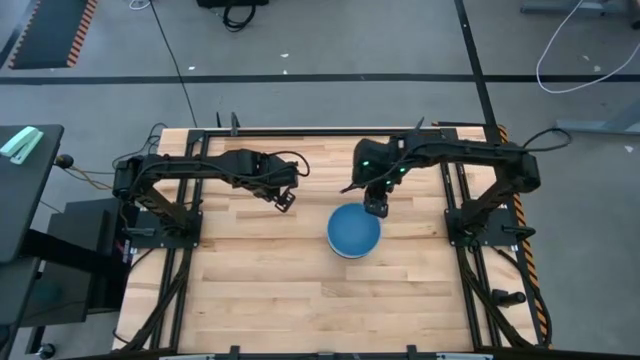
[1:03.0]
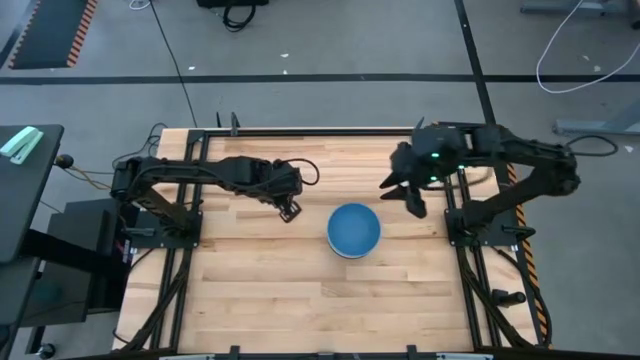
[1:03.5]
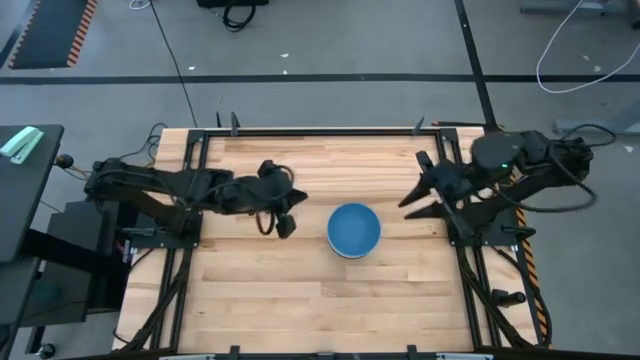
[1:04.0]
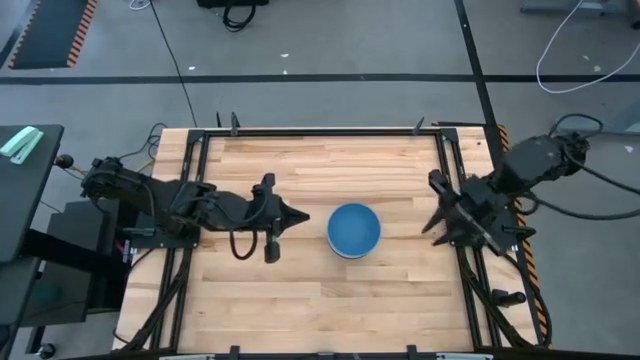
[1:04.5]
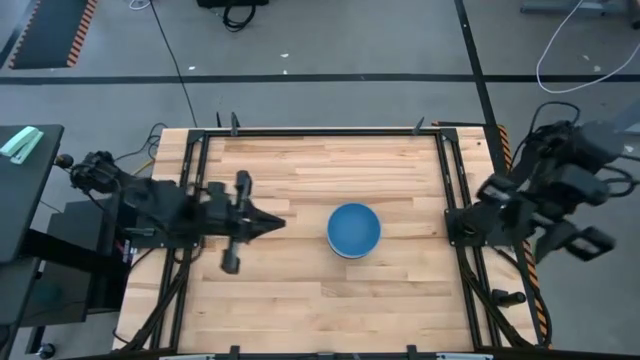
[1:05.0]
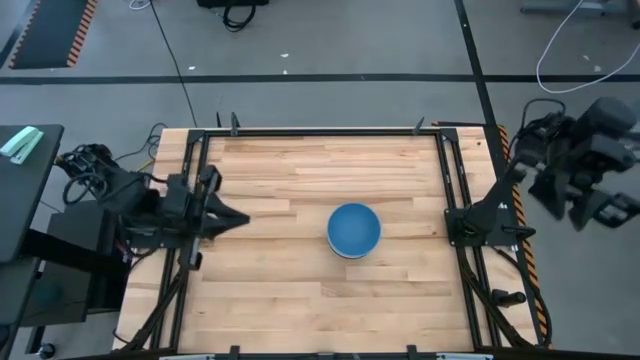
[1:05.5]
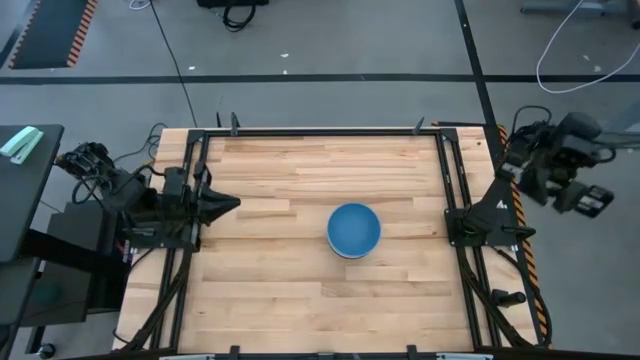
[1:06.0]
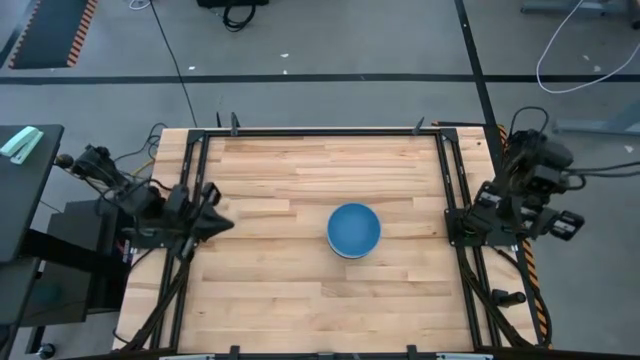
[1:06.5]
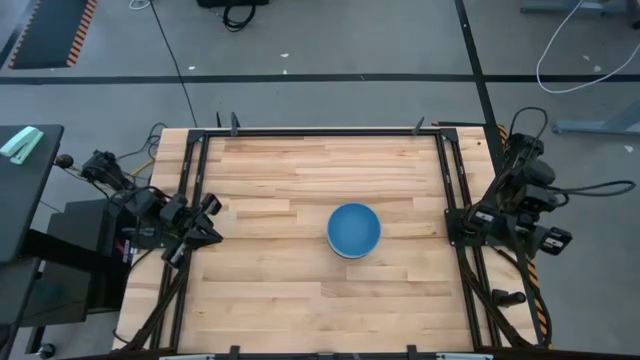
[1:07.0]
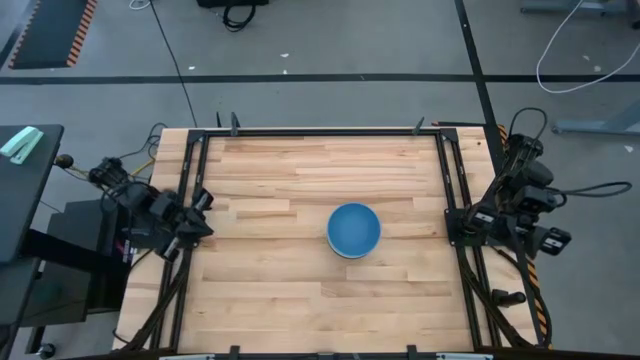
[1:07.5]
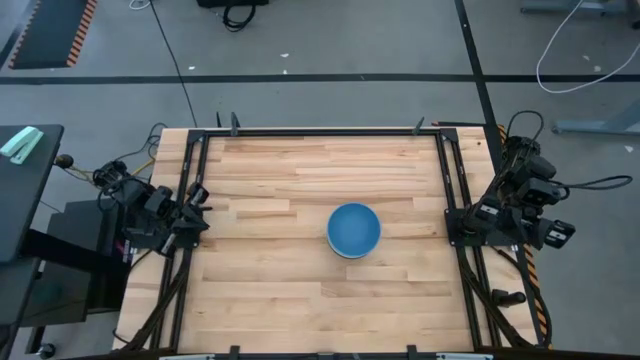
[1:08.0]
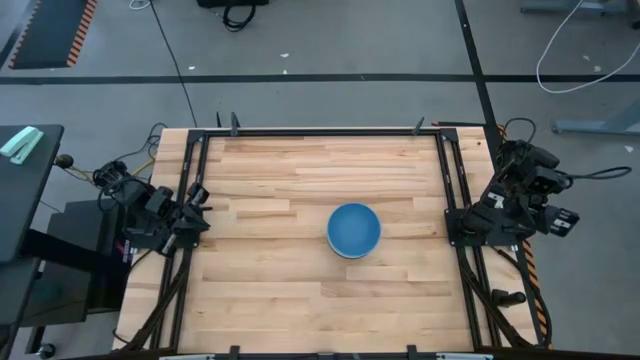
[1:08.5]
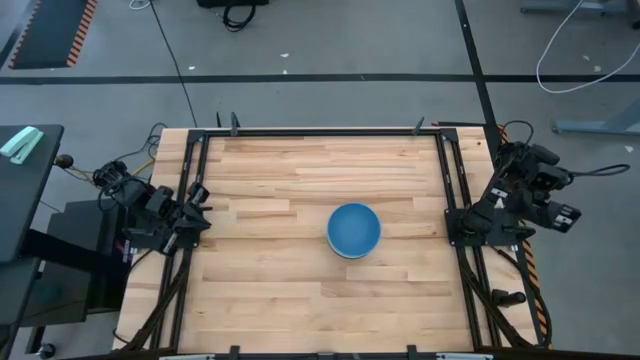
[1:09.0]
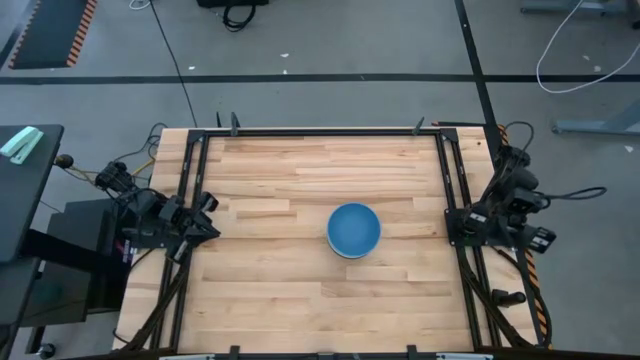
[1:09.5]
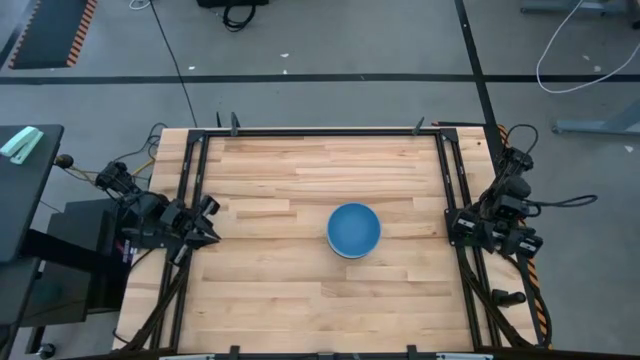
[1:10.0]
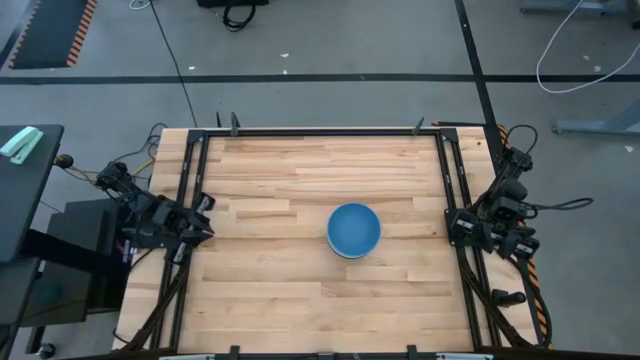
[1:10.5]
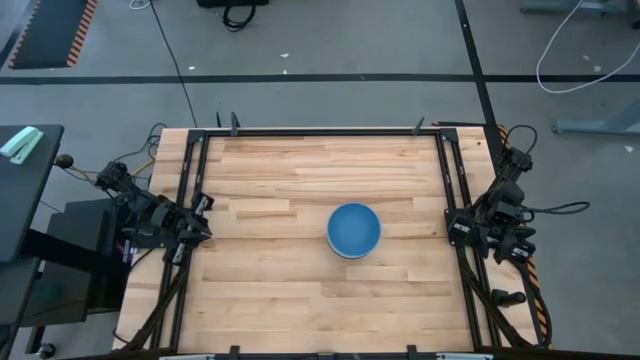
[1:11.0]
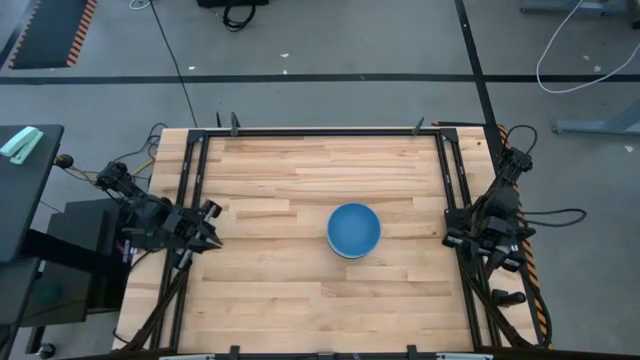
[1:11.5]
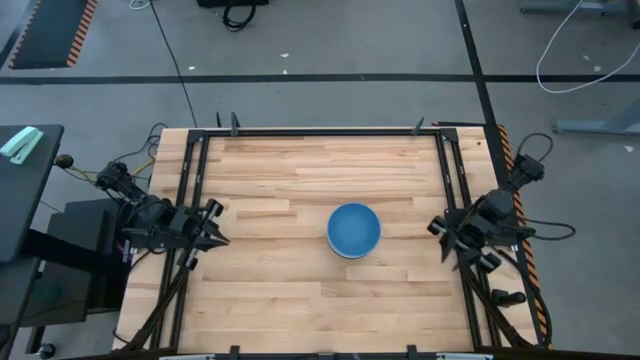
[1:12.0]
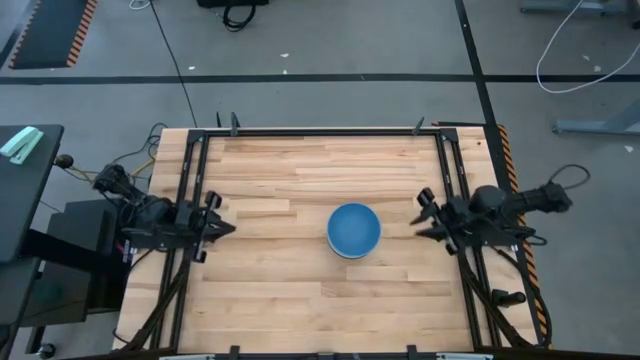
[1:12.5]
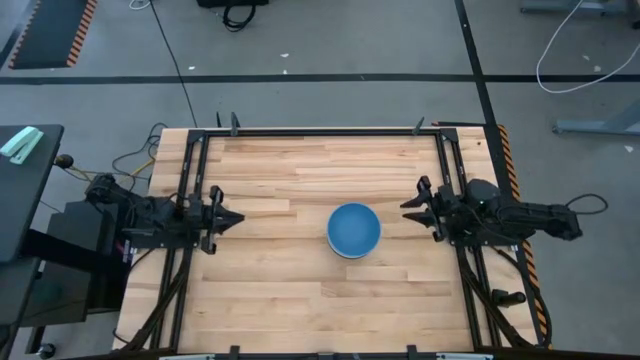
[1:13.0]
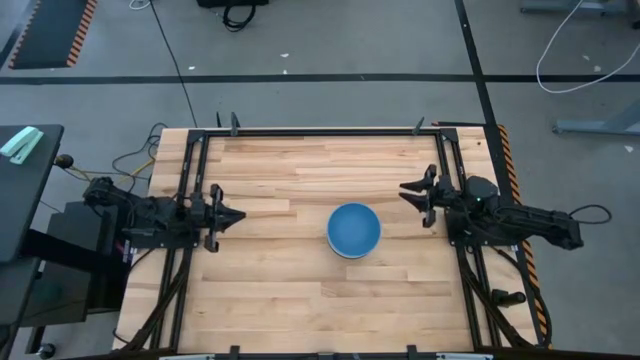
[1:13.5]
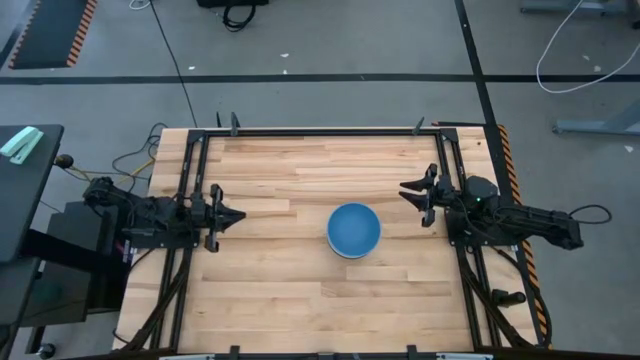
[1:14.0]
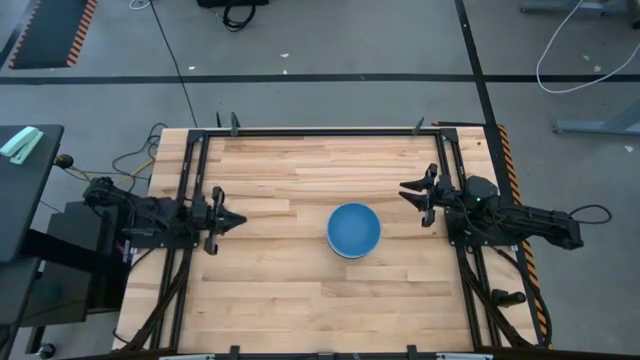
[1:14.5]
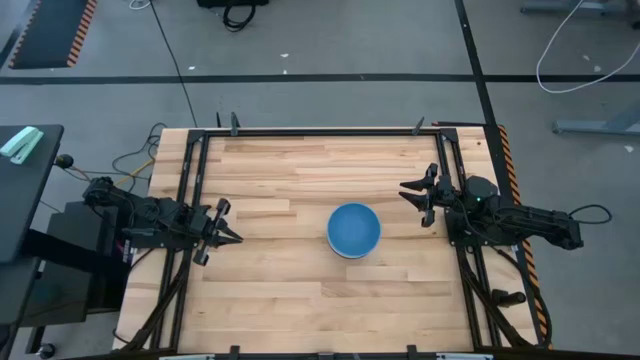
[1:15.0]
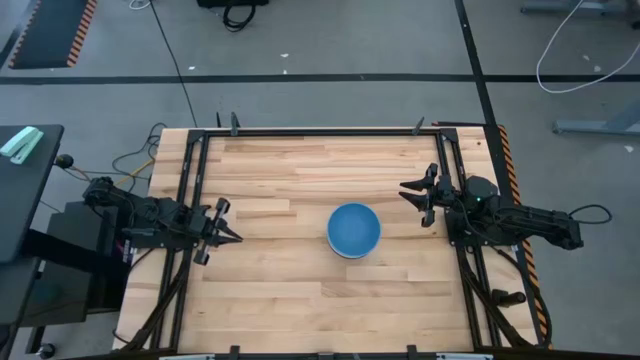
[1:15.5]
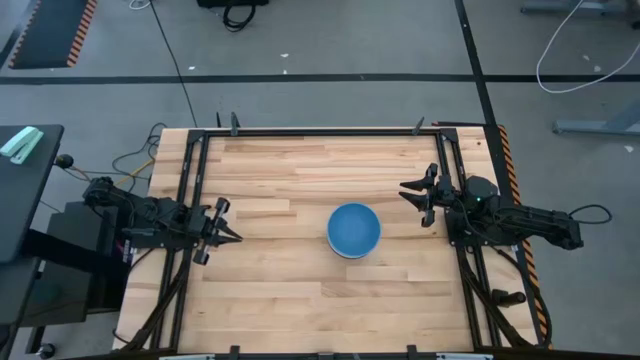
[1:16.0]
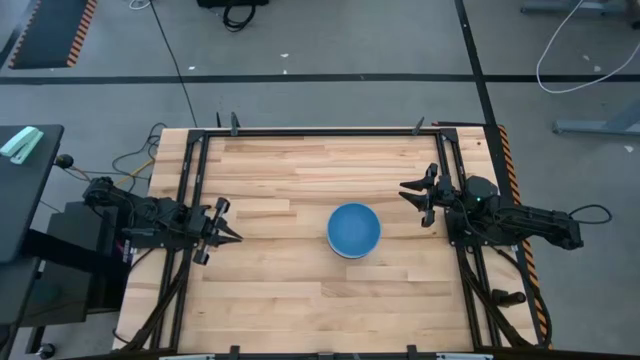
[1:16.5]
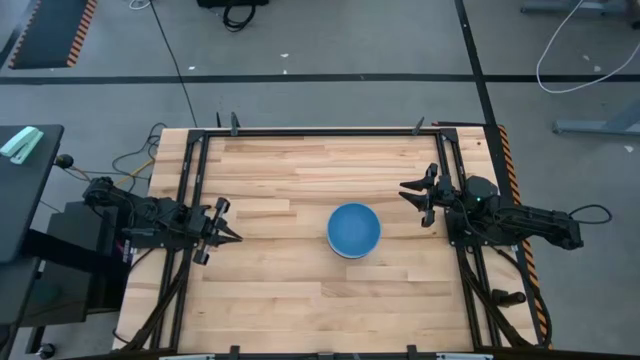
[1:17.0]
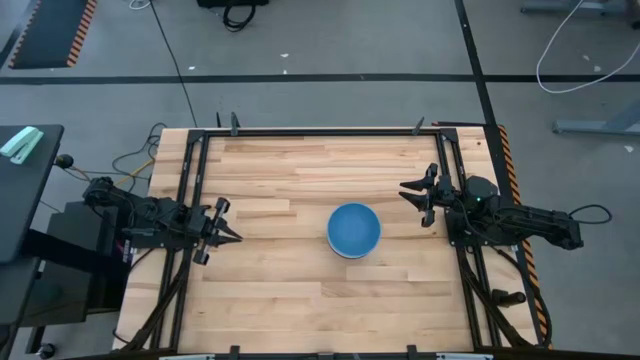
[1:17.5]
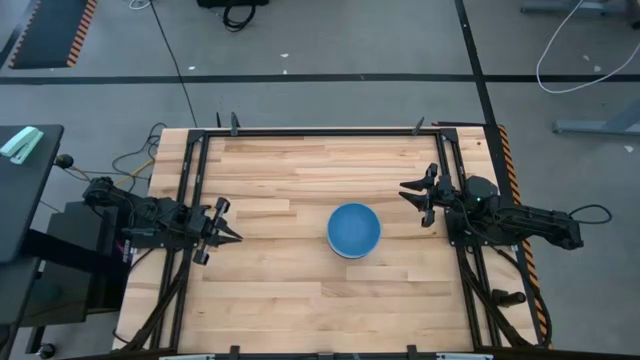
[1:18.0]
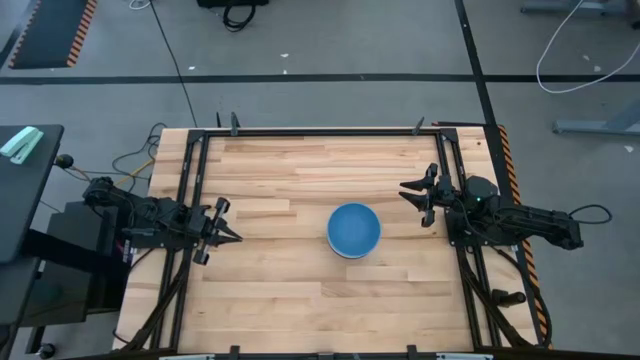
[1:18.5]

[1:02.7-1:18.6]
Task: Nest bowls inside each other
Return to Home Position

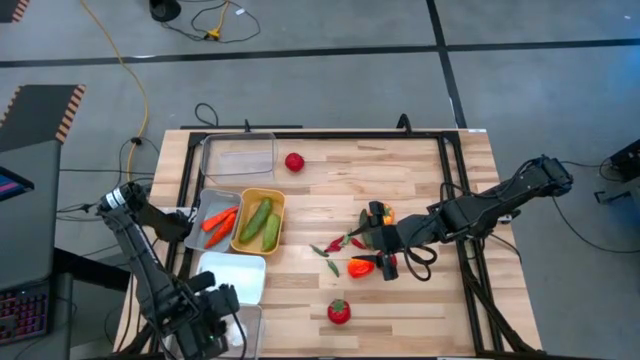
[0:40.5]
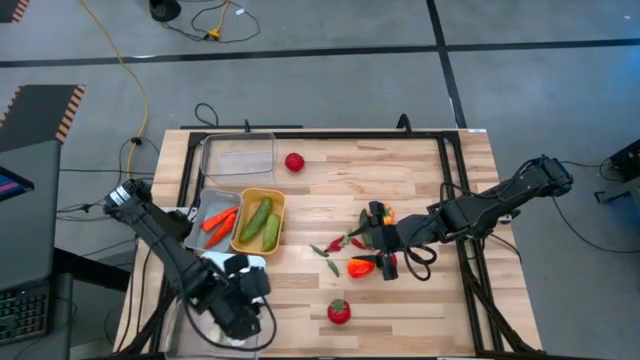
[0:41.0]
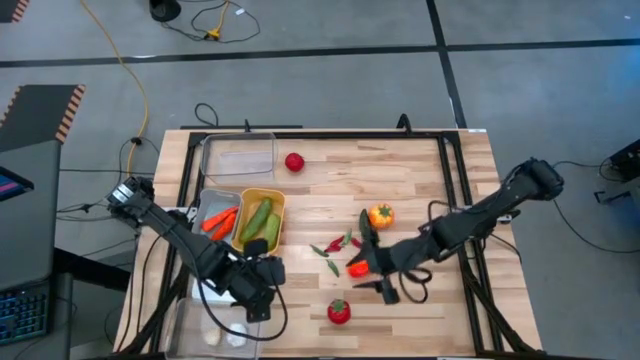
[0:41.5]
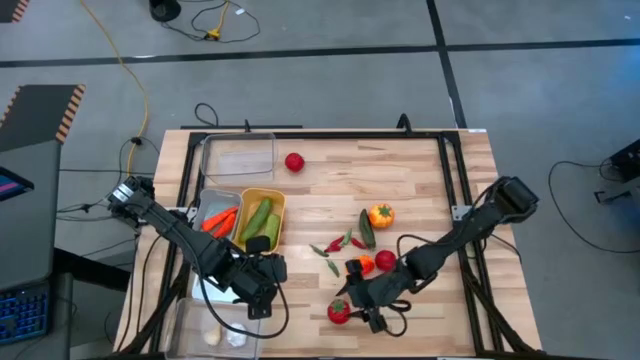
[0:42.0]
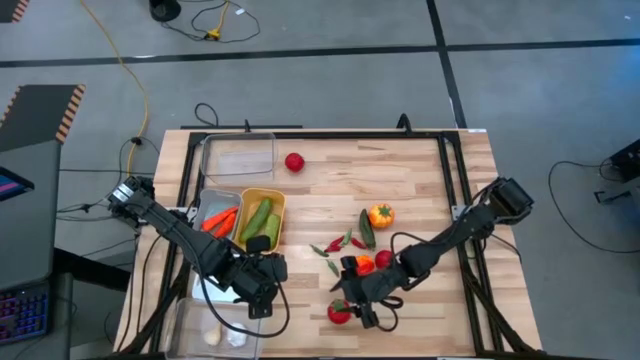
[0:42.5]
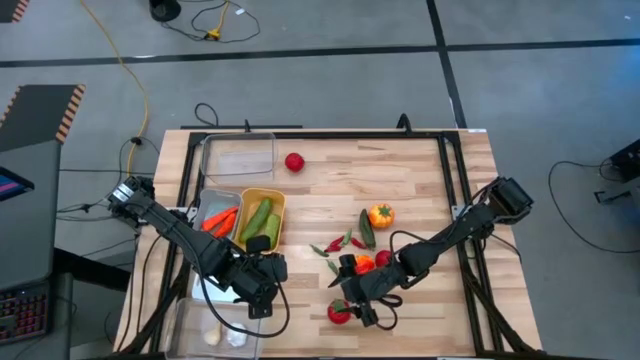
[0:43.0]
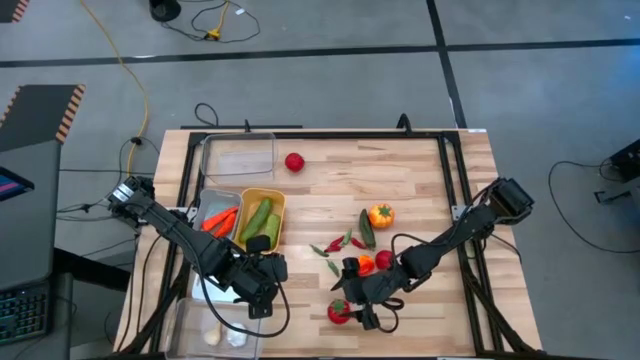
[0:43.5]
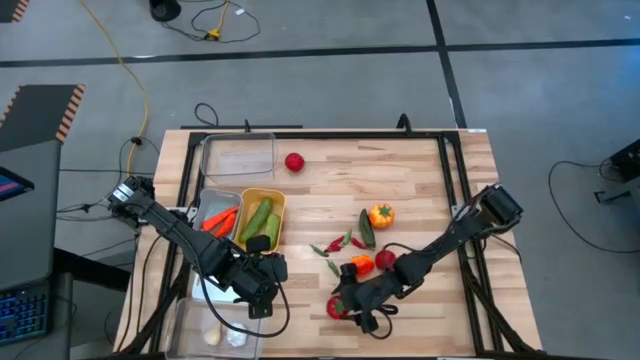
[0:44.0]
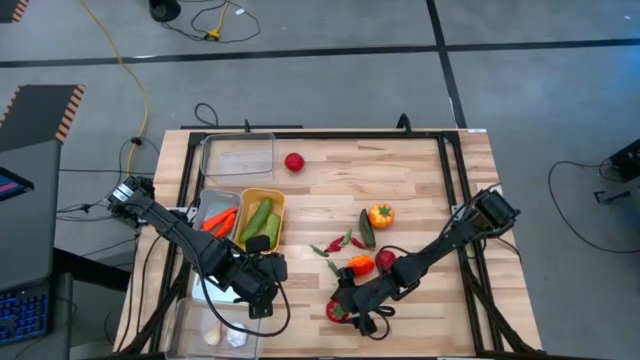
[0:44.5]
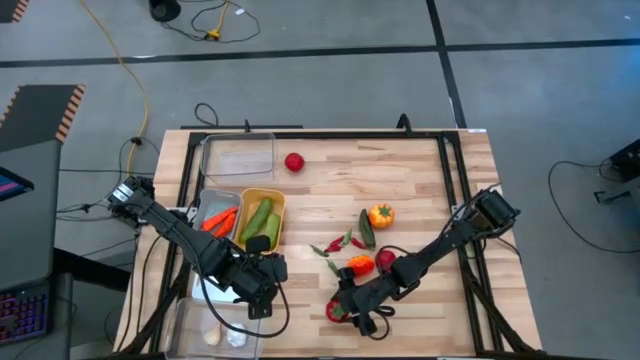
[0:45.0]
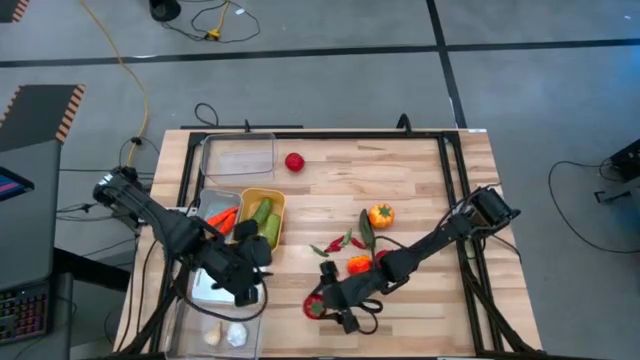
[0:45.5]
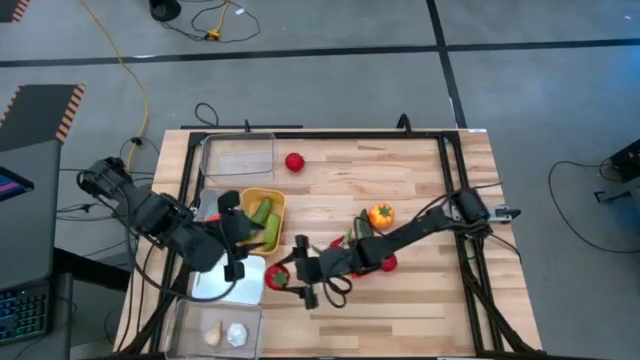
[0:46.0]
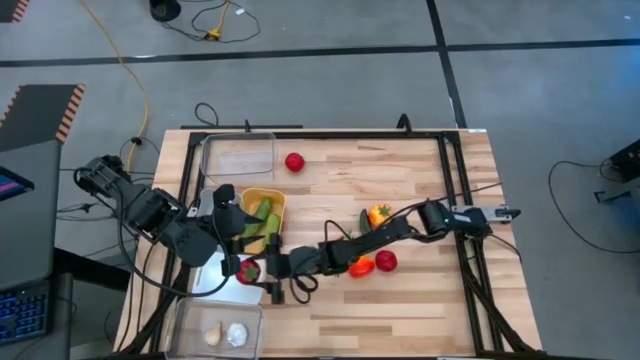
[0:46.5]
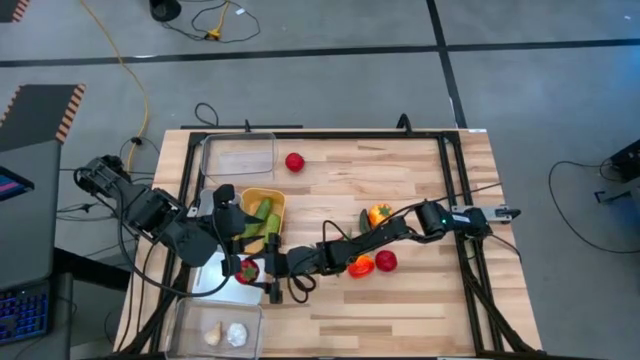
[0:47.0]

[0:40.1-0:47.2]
Task: Sort produce into baskets
Put the bottom center tomato into the white bin
